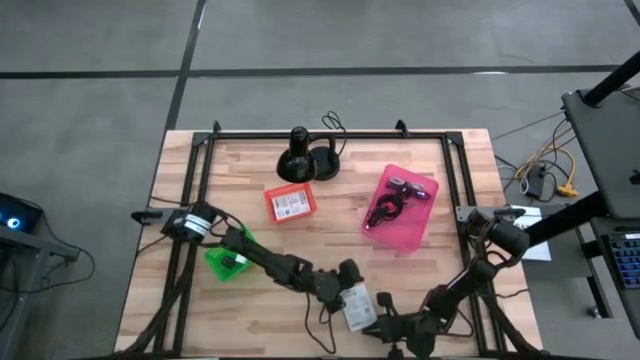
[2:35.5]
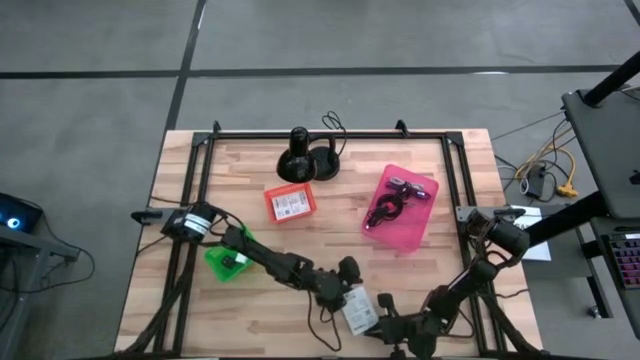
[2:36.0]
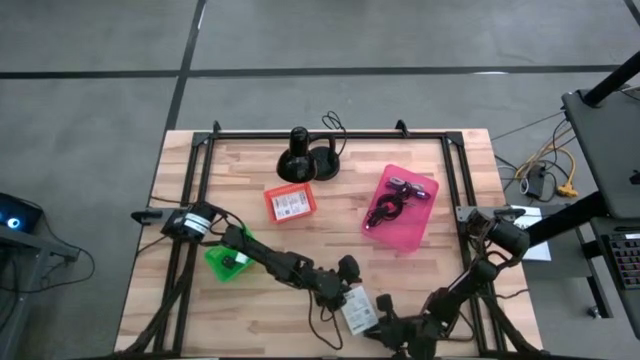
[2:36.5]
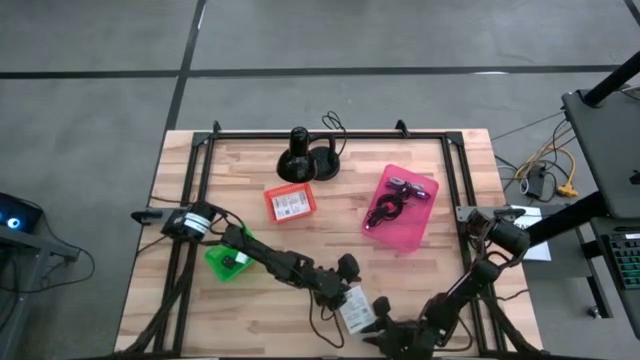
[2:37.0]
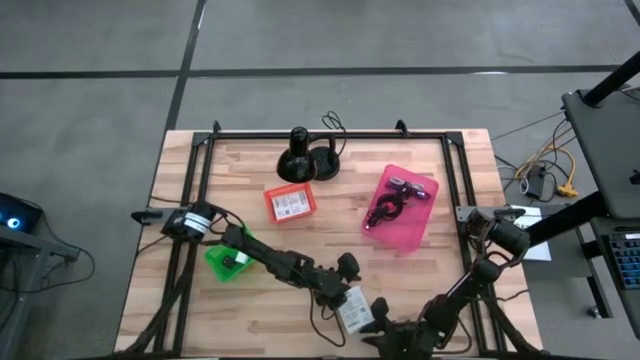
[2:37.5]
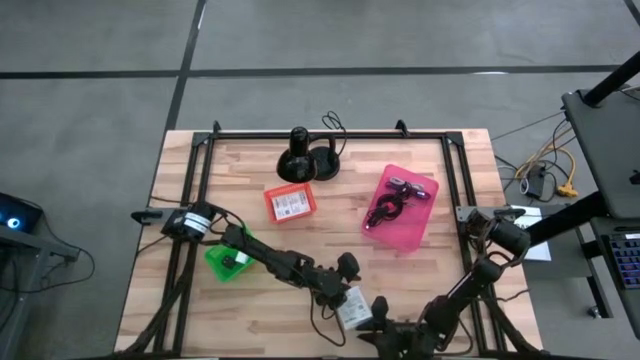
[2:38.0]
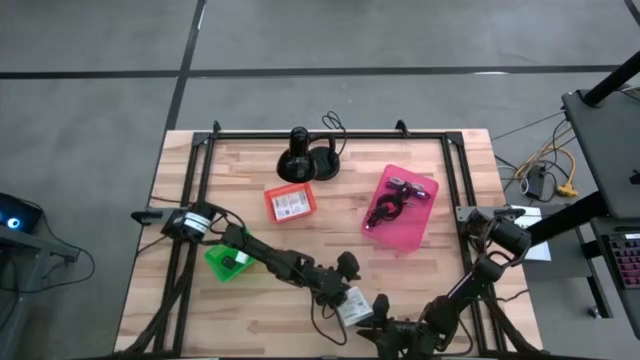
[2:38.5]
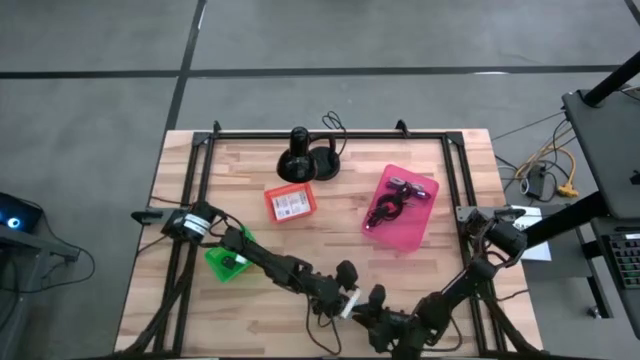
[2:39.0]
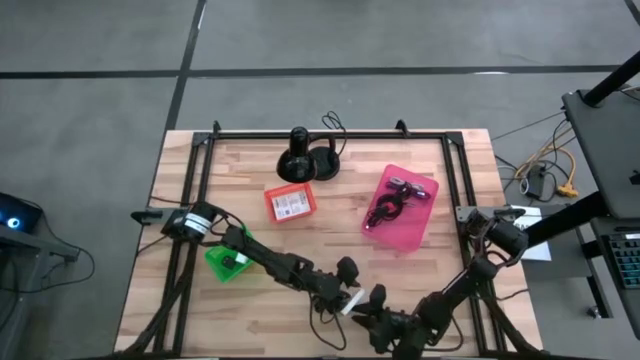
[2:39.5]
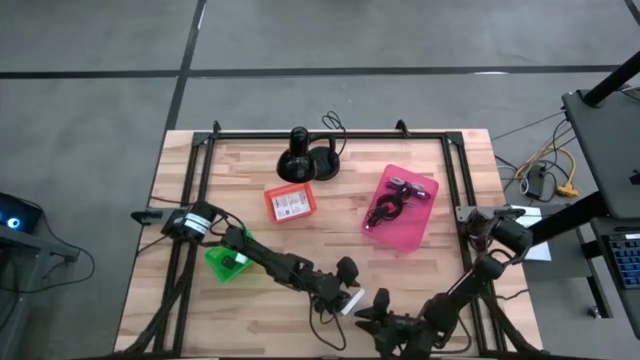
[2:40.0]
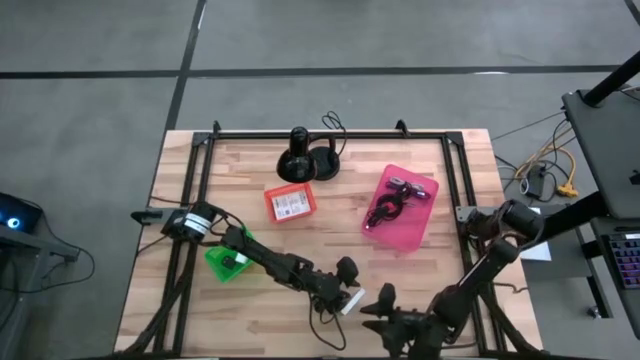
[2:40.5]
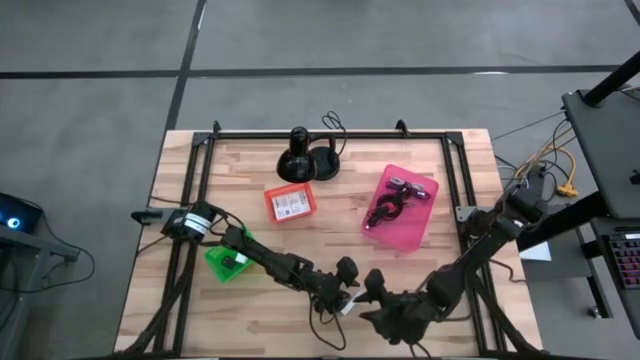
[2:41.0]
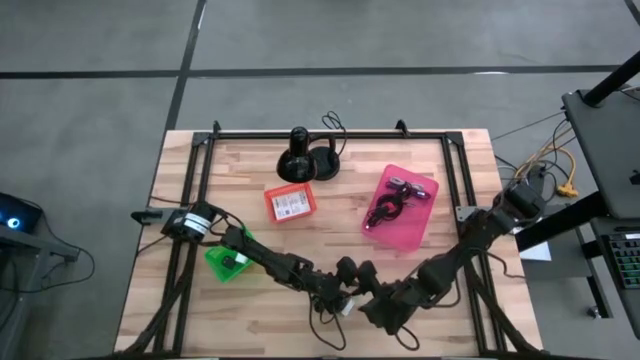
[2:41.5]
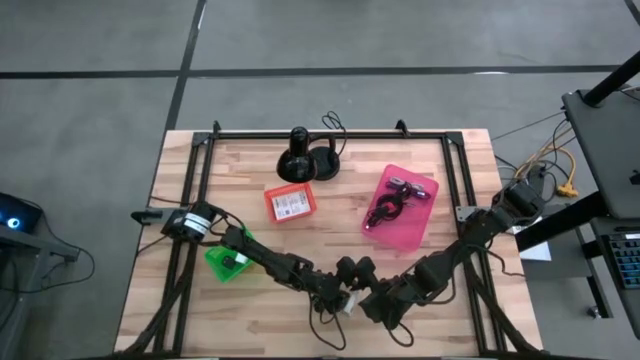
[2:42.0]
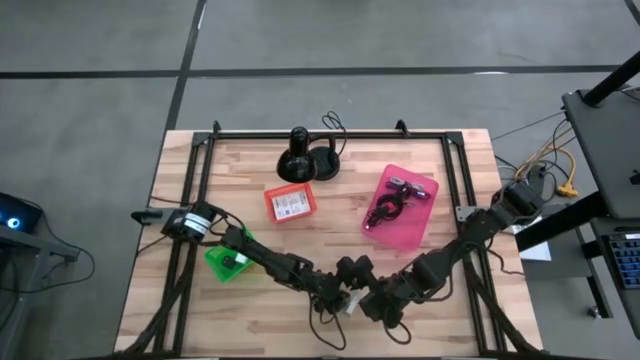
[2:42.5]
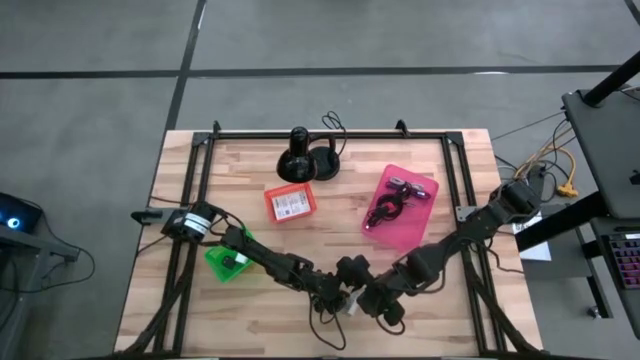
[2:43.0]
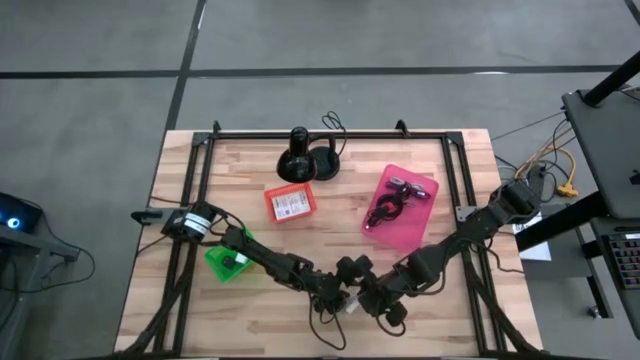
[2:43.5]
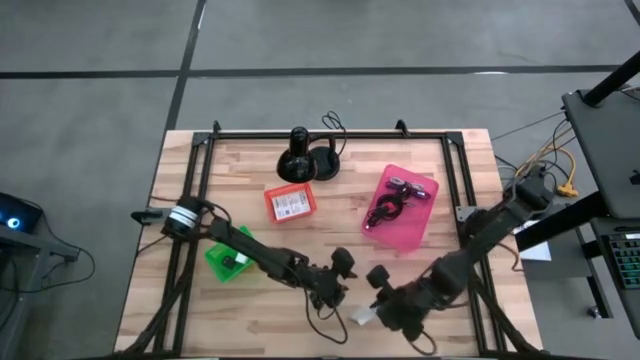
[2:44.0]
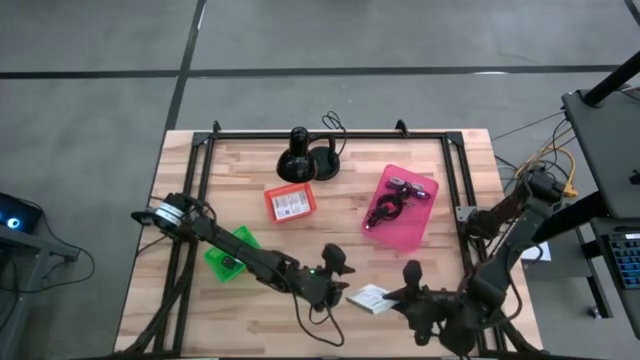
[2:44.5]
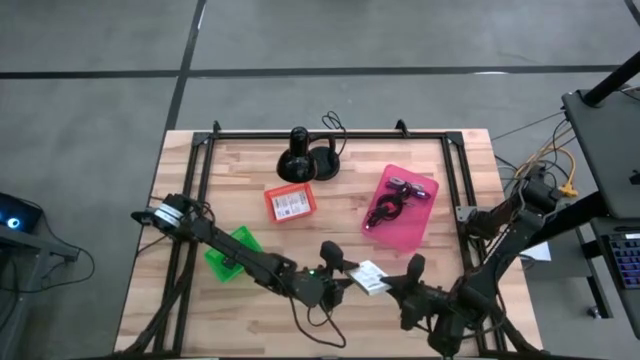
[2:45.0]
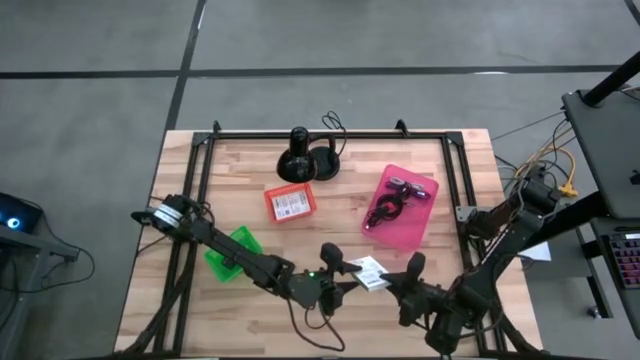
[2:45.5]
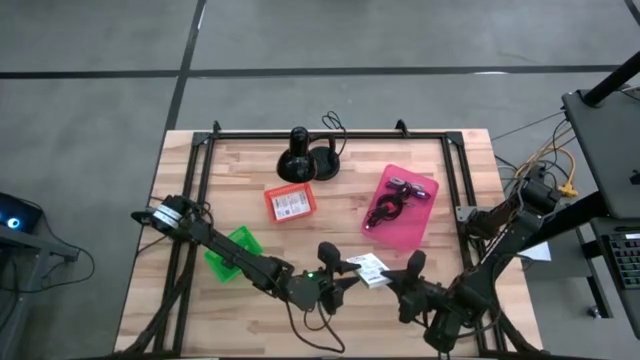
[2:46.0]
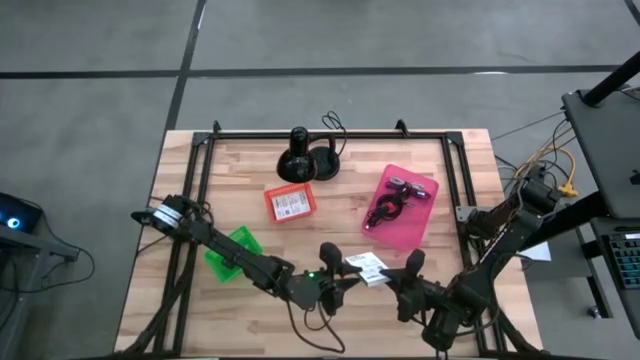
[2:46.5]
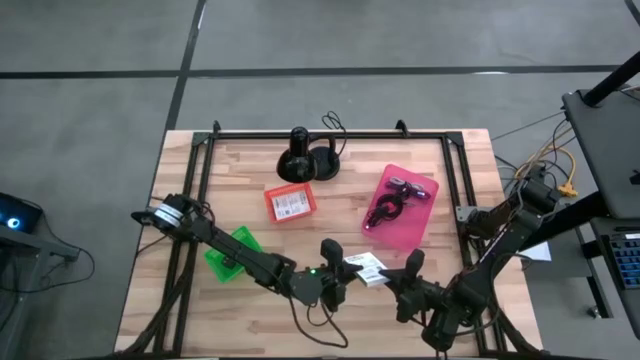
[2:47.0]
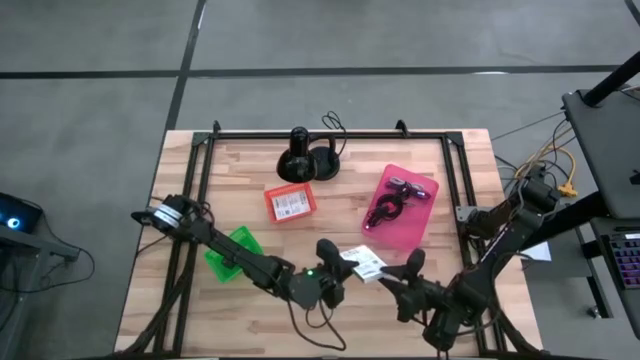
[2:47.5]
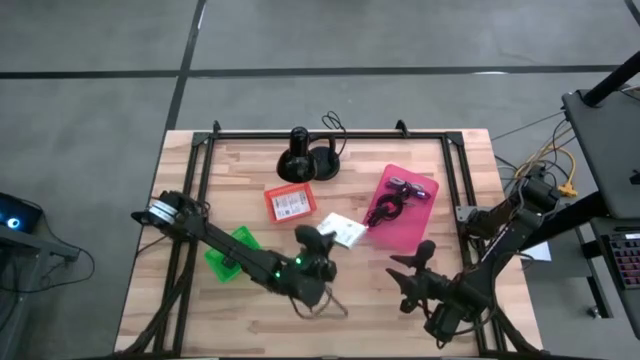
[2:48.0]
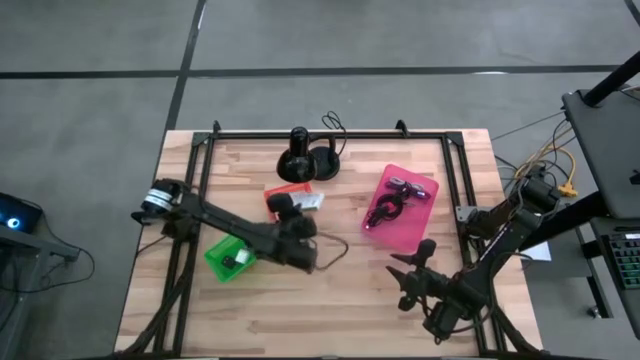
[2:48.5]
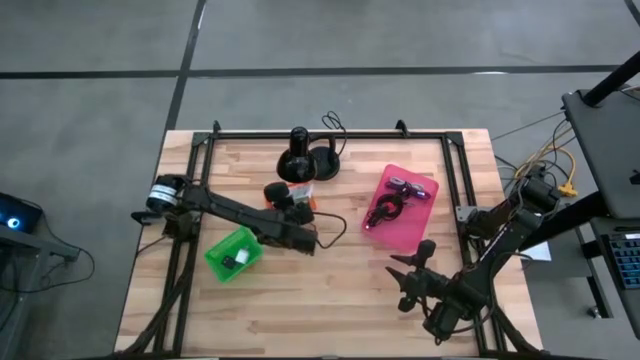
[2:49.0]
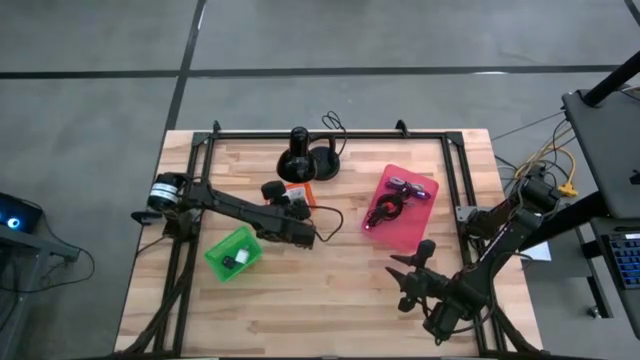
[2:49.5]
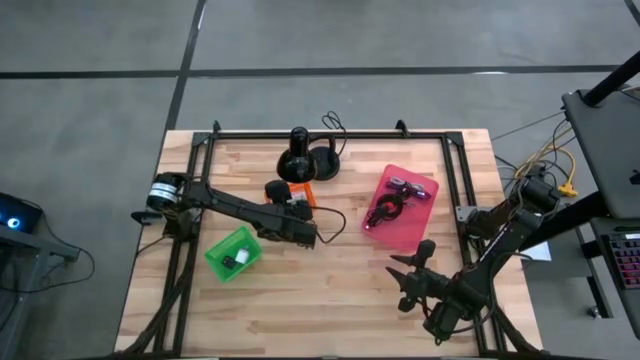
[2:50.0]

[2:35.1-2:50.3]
Task: Pick and place items into bin
Stack the card reader box on top of the card reader box in the orange bin

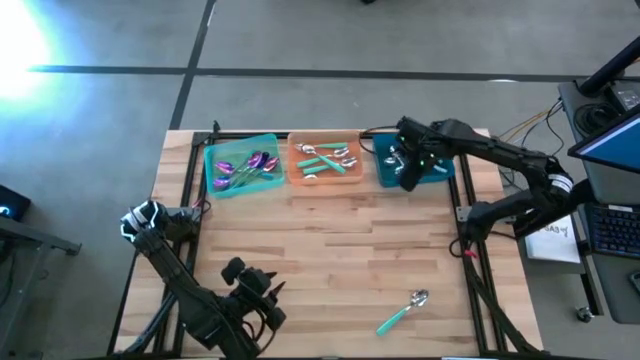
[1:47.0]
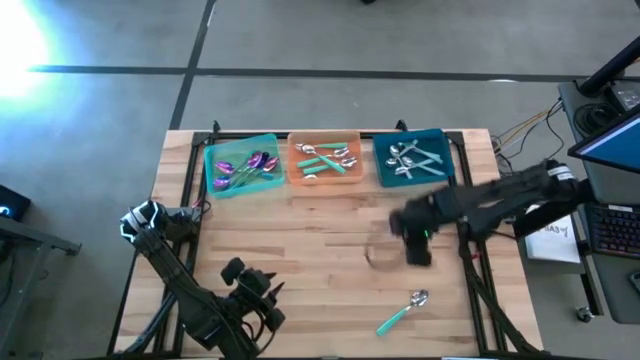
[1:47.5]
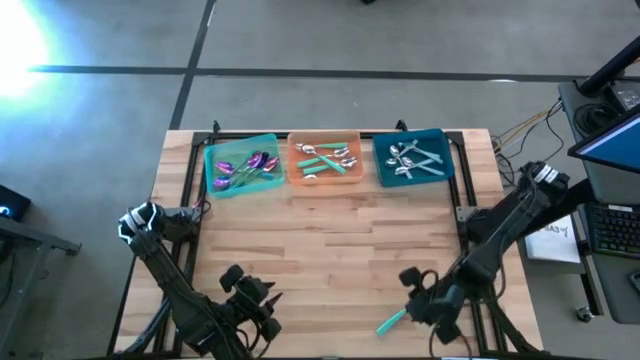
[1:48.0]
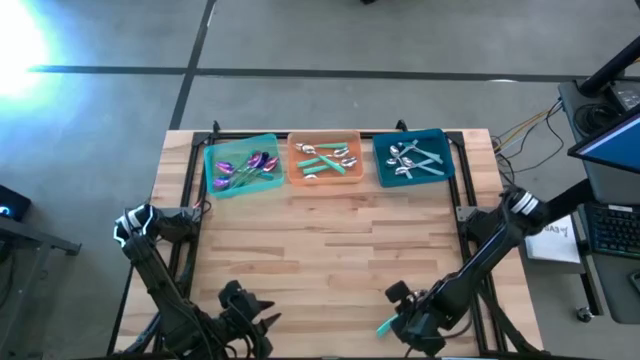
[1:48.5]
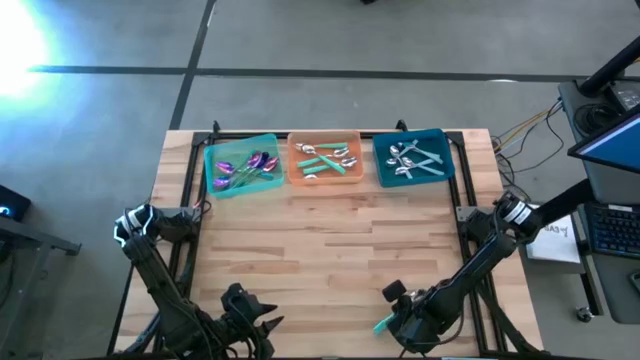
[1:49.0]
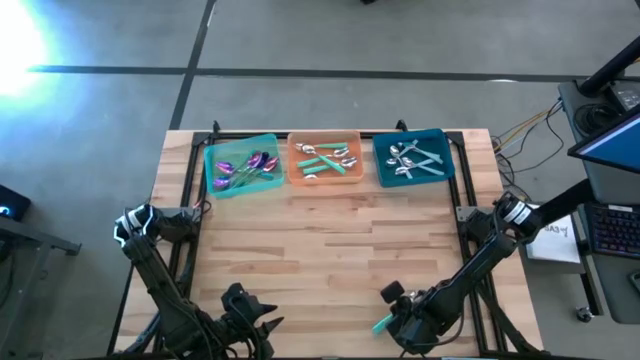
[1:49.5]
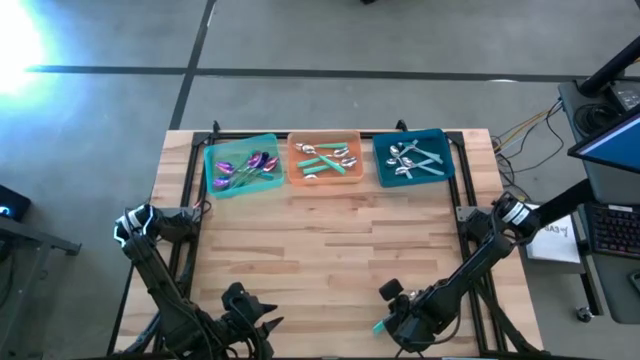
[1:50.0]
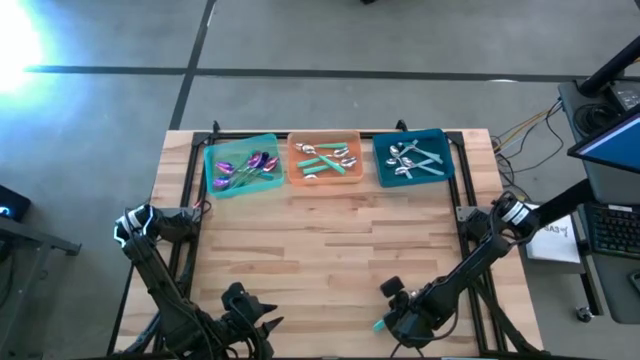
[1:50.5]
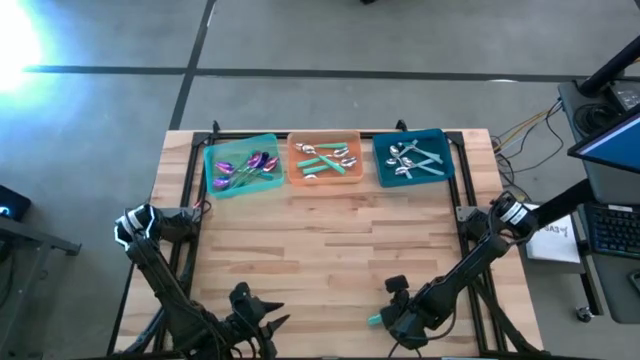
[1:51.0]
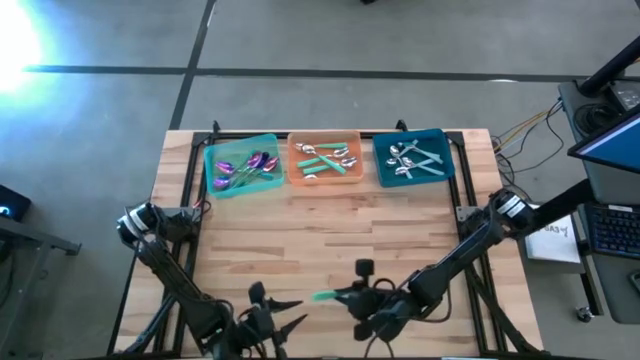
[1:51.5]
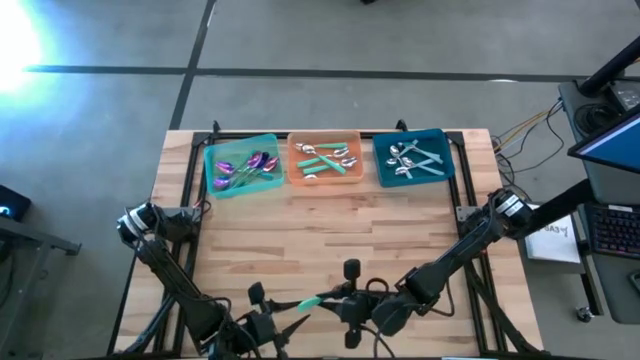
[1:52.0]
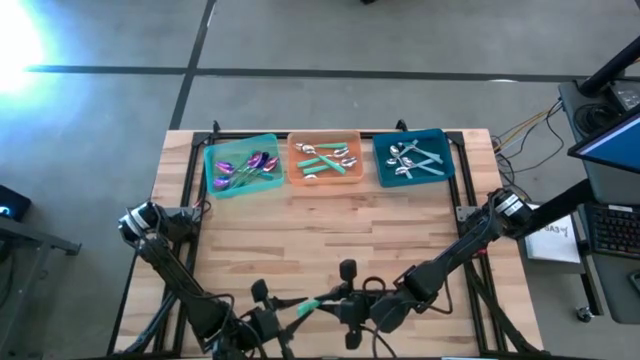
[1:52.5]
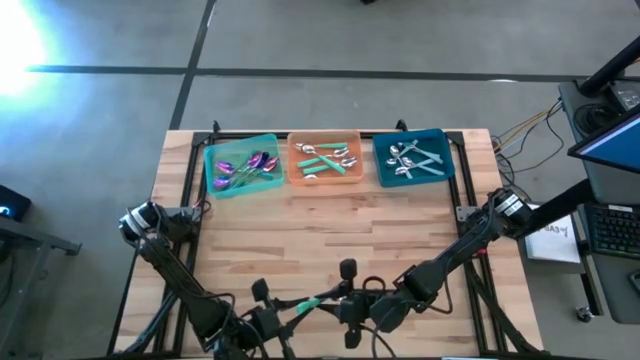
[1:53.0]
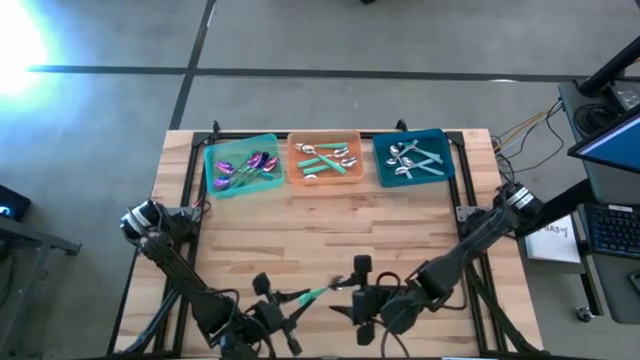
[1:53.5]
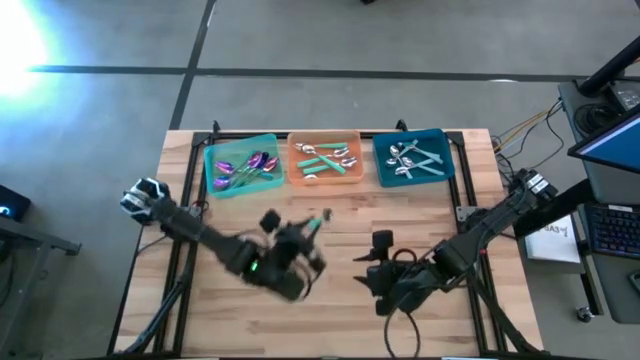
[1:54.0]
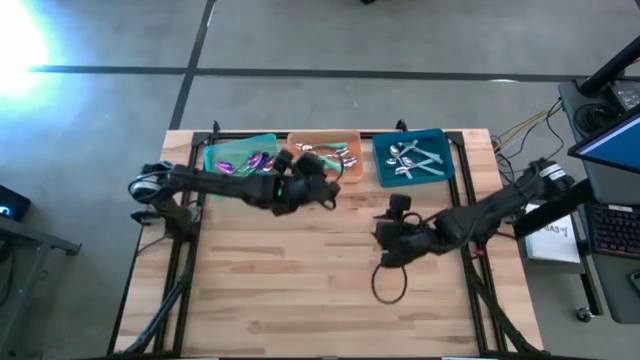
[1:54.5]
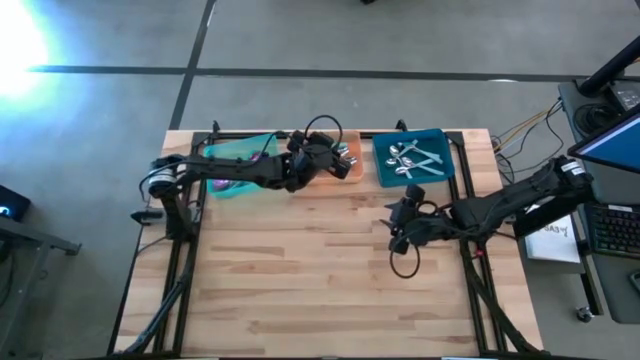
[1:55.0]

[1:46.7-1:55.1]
Task: Sort silverware by color (type)
Put the green spoon into the orange bin
